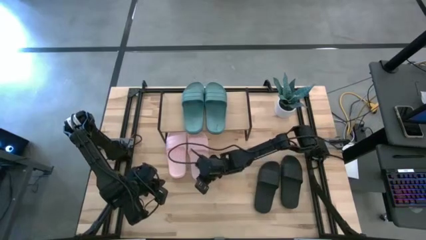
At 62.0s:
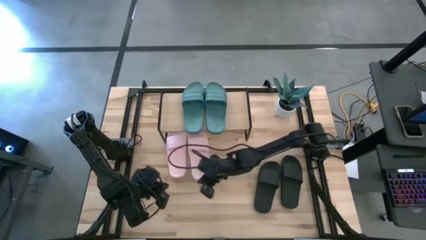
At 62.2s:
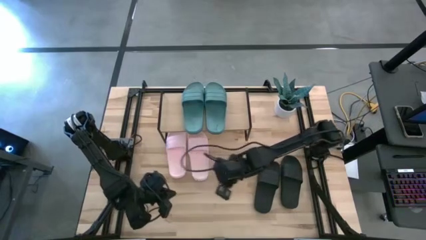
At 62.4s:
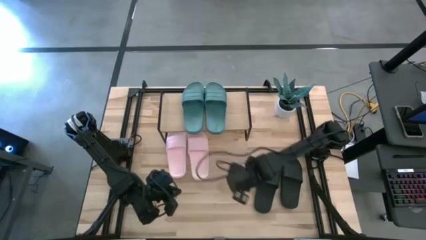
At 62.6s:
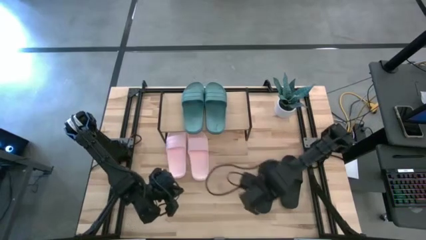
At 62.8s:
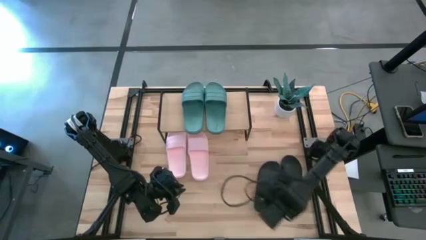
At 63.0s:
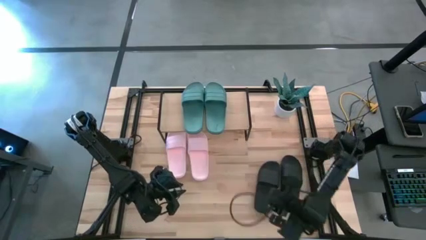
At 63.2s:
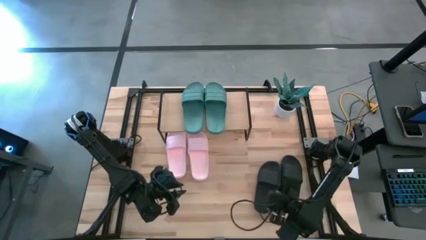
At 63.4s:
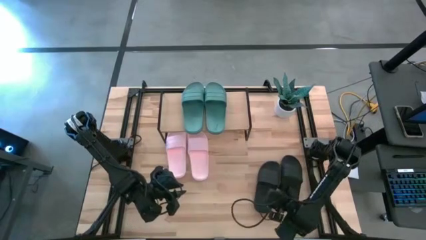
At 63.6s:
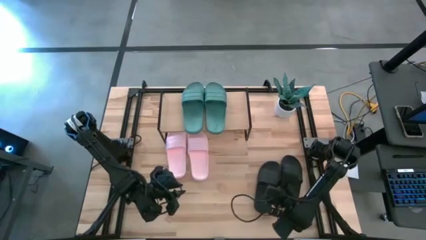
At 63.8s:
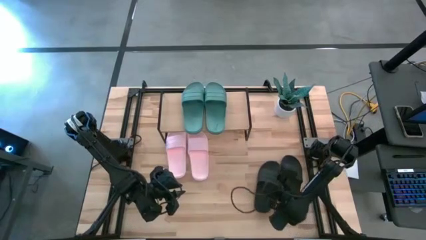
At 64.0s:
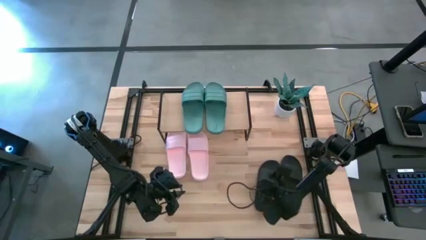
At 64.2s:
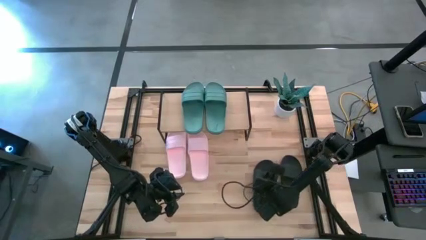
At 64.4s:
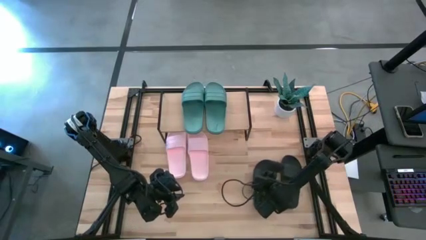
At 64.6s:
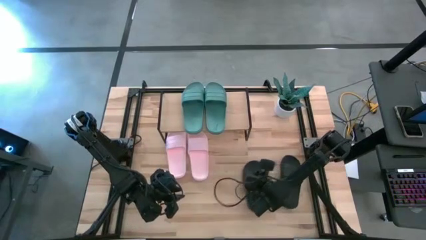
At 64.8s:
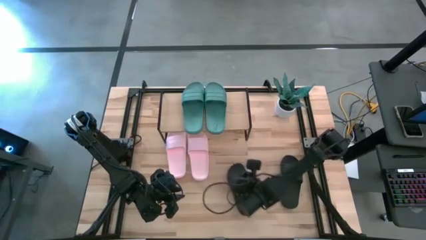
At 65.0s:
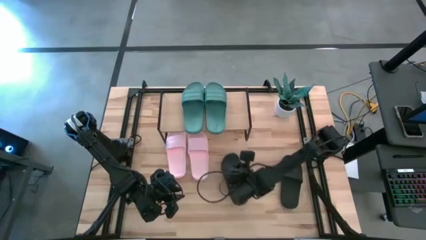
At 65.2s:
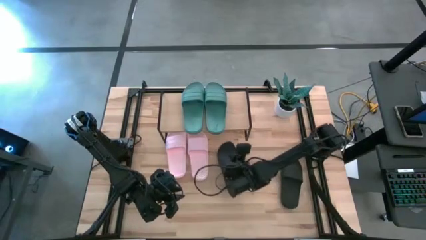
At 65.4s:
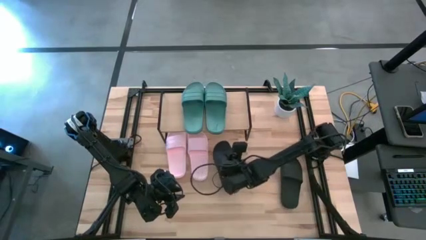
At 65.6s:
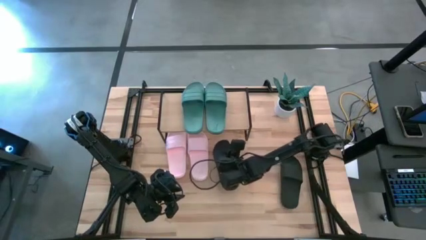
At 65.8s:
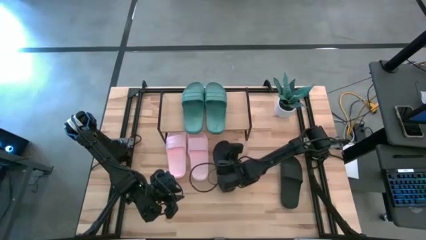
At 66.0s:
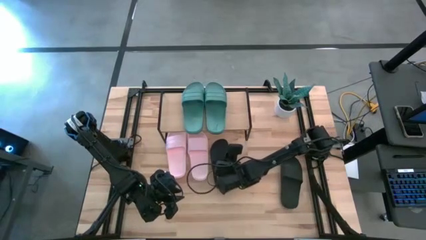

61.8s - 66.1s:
Task: Pick and place slides into the shelf
Put the left black slide under the shelf

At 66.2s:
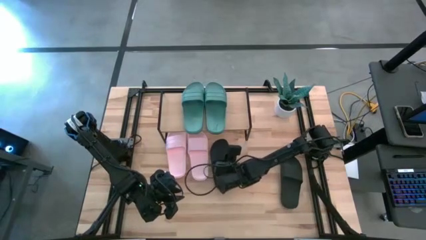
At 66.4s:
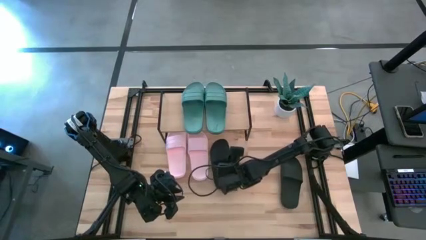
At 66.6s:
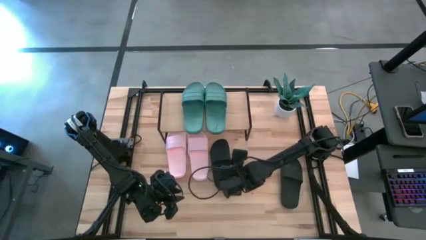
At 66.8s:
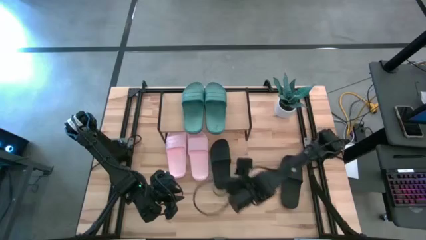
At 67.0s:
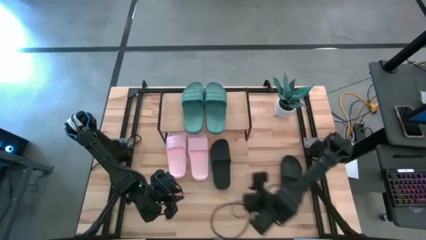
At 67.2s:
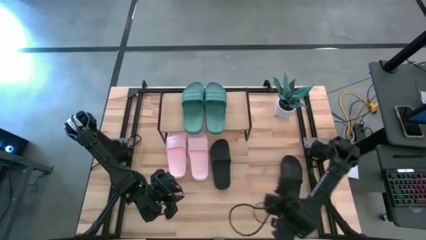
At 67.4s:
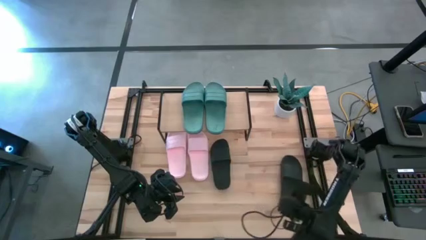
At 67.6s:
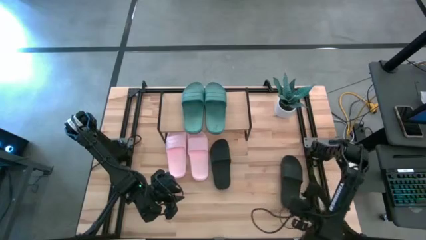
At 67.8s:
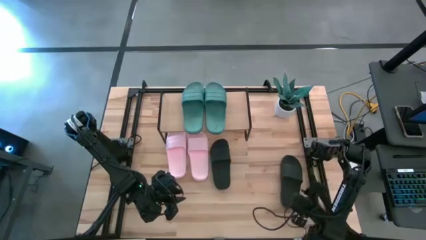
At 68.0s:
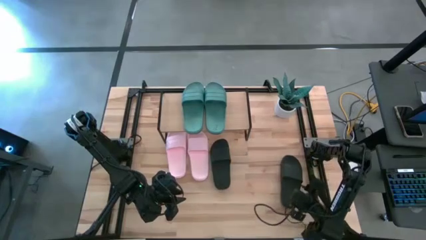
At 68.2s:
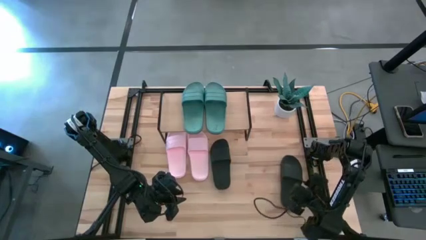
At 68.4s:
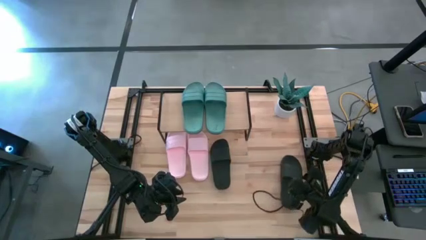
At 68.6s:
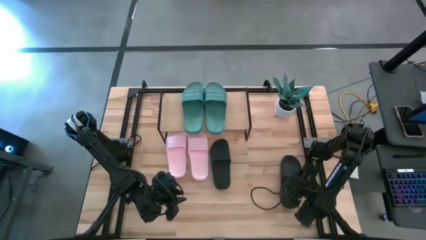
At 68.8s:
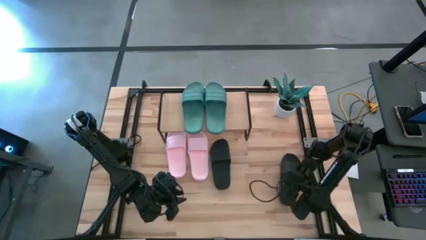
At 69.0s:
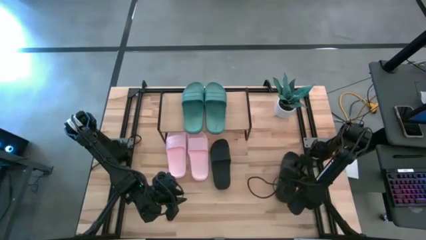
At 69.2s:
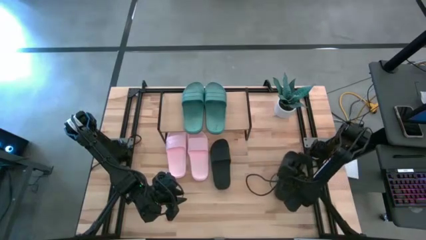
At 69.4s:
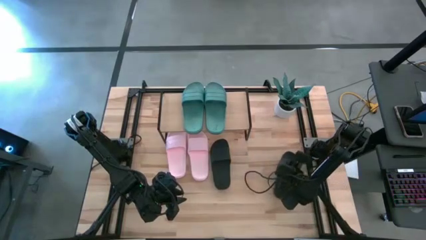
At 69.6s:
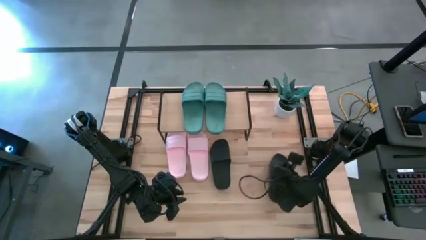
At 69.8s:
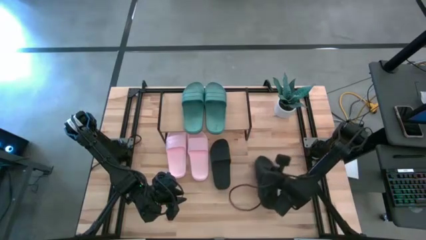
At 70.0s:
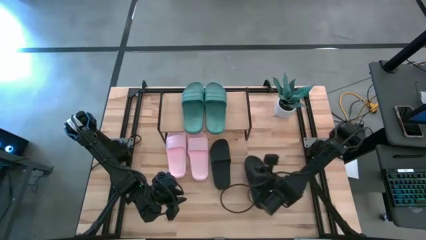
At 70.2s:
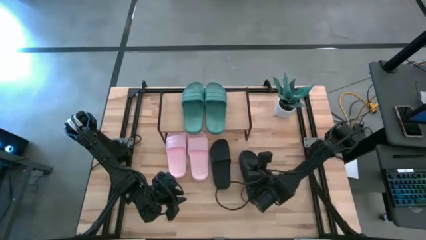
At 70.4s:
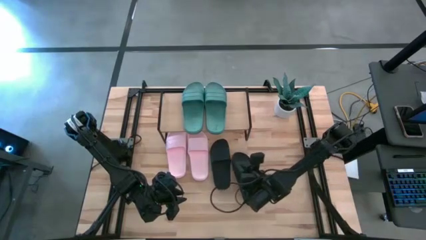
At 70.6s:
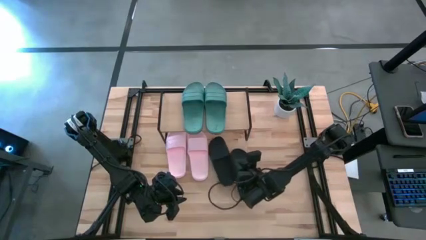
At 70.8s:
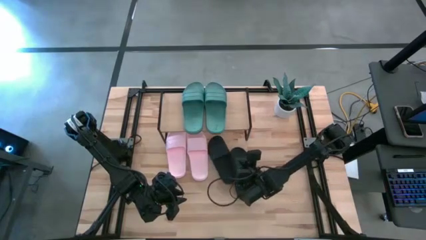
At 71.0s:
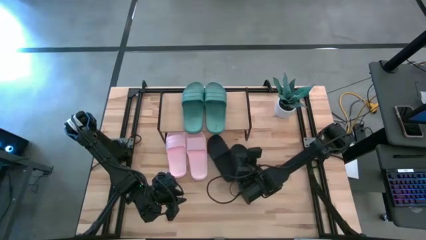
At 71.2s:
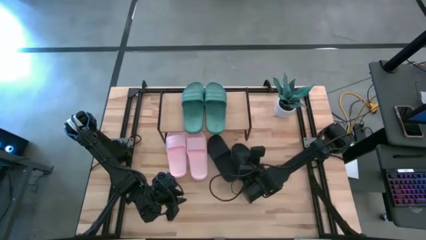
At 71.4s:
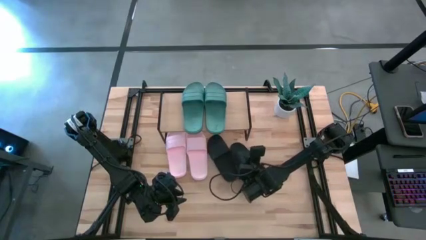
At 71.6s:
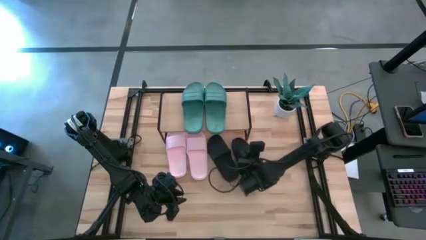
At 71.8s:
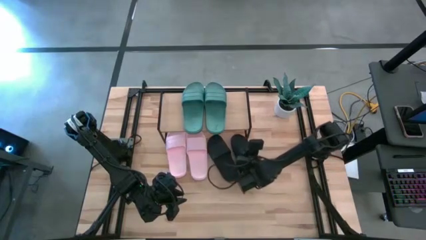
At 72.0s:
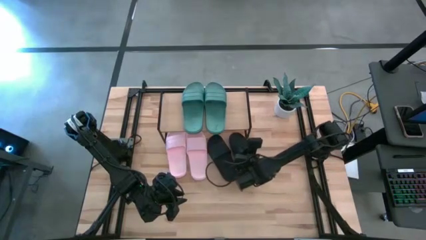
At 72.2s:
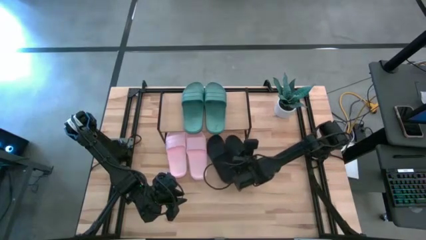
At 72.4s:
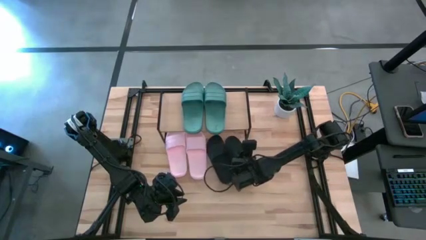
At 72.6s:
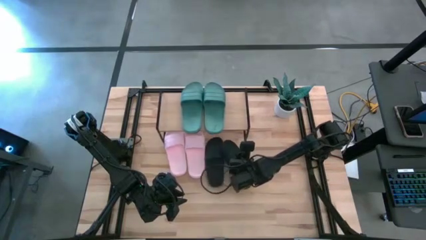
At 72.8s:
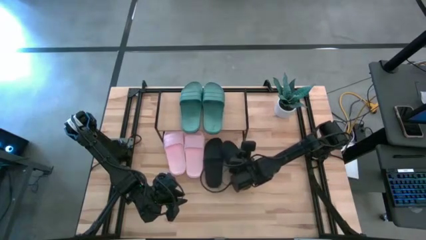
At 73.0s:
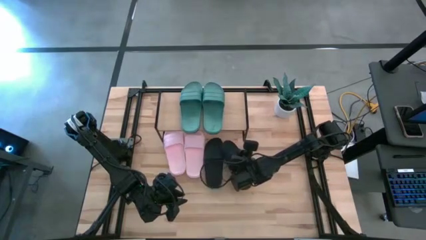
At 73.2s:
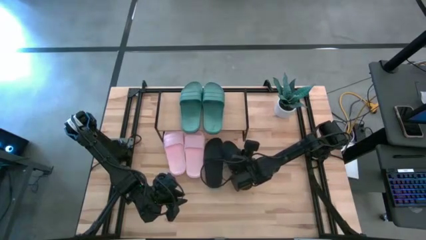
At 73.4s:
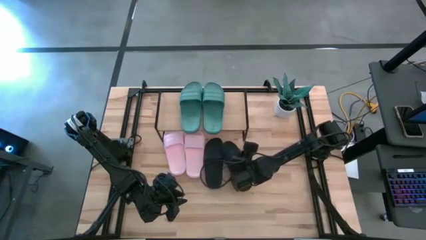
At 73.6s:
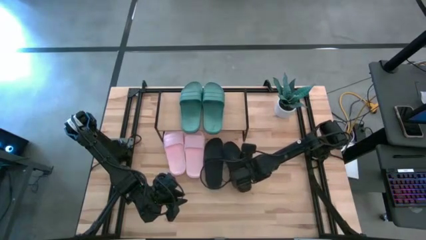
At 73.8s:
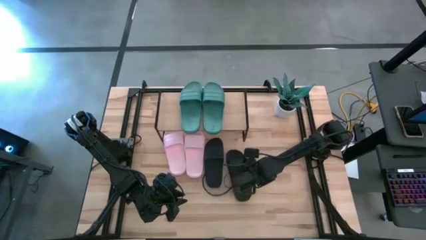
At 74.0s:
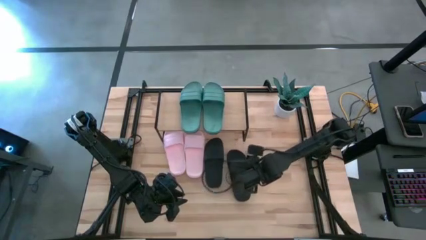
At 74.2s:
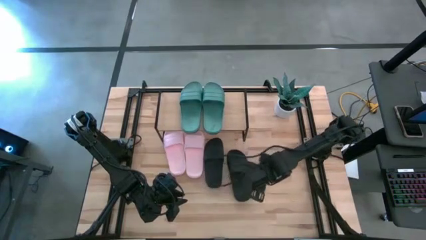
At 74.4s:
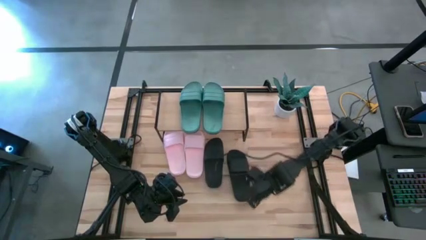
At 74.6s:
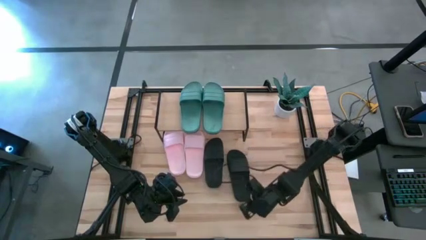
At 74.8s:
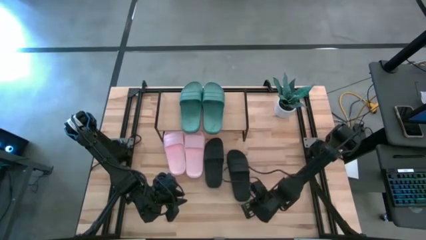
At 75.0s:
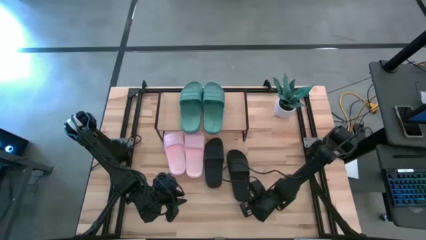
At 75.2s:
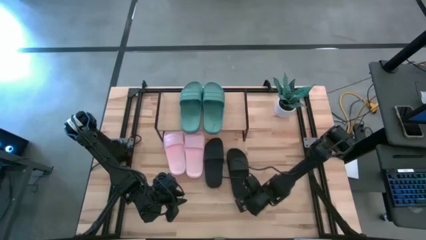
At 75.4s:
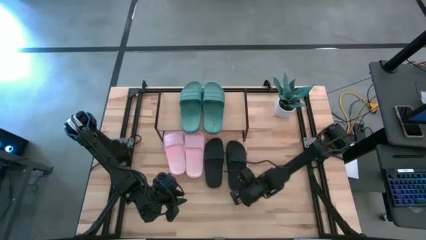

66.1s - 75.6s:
Put the black slide under the shelf

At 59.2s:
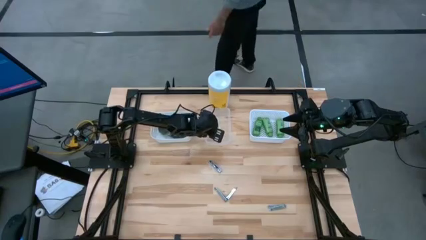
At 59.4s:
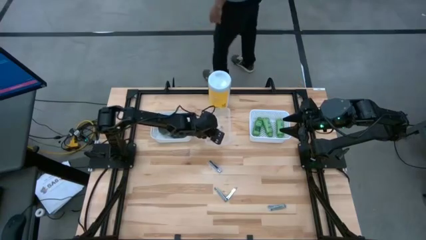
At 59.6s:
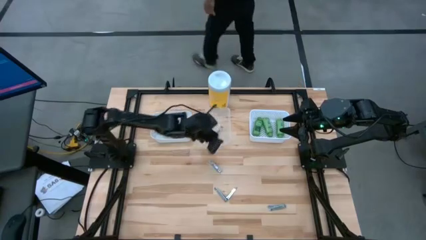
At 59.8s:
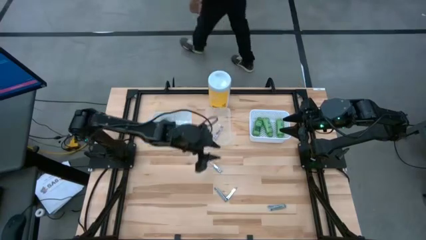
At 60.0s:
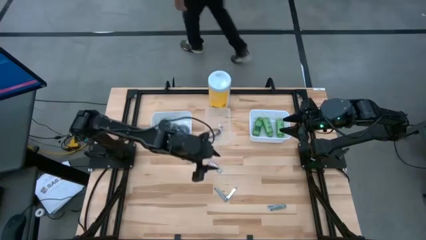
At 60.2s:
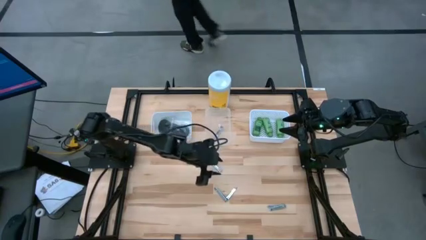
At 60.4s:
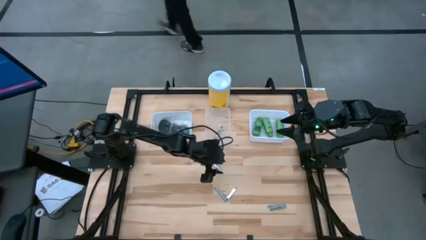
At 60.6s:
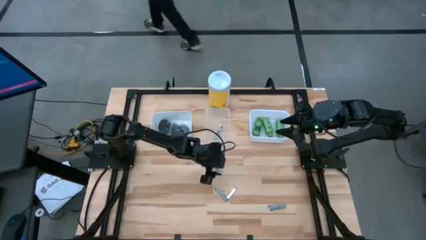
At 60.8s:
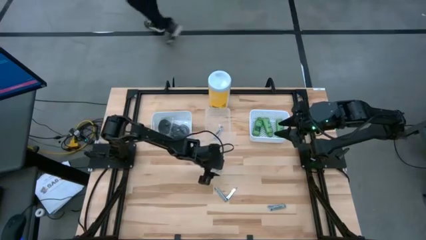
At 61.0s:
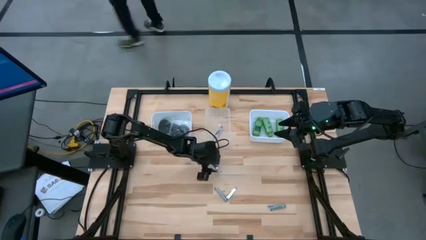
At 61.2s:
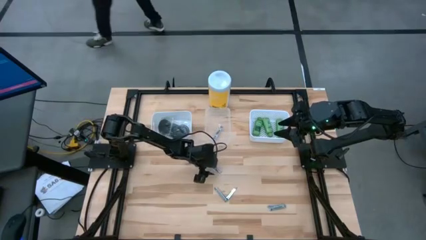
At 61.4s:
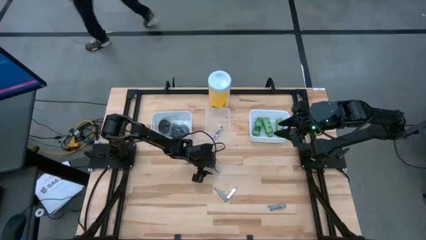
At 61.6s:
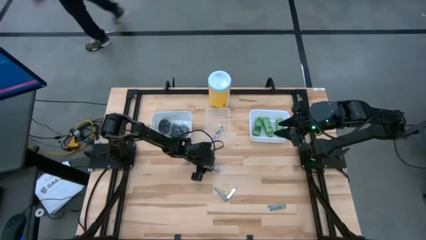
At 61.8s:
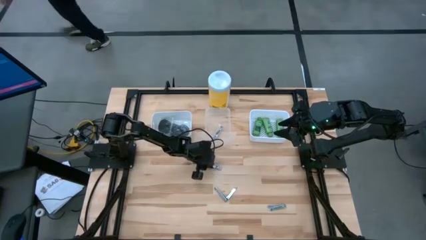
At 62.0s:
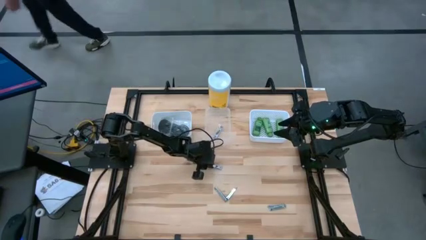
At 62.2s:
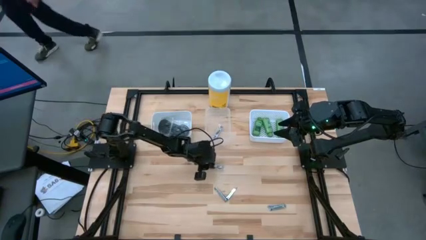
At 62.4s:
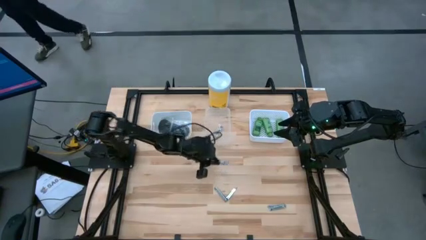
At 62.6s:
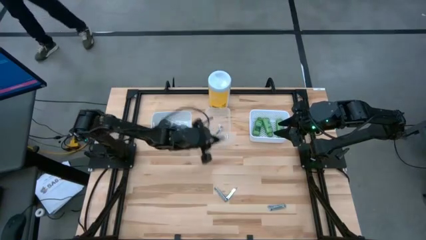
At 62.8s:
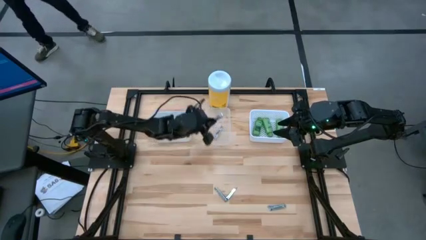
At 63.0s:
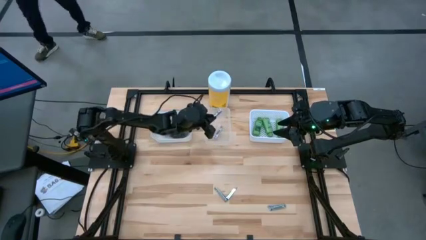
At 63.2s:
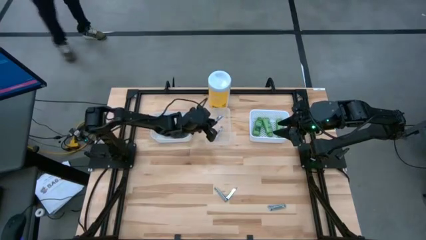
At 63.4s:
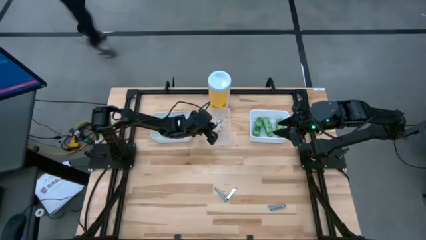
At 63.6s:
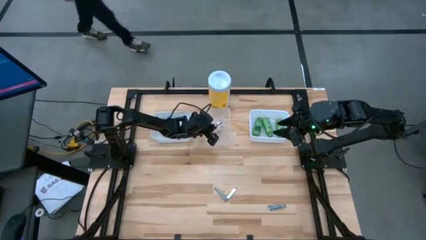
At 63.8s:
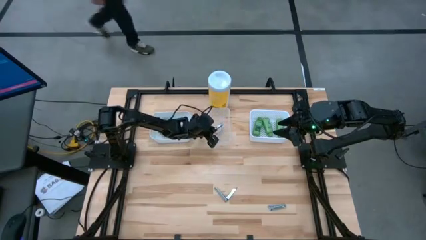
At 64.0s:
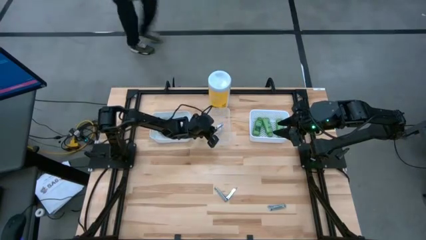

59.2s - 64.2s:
Task: Pick & Place Travel size toiletries
Put the silver nail cutter into the transparent bin
